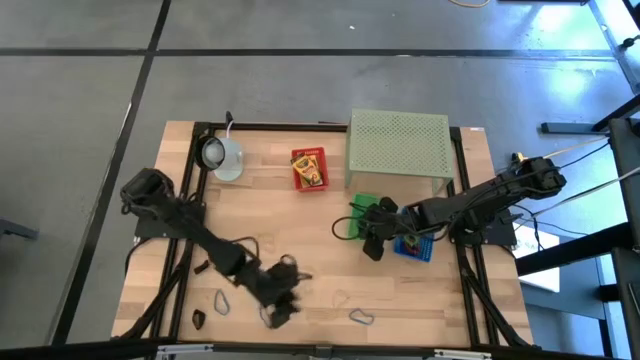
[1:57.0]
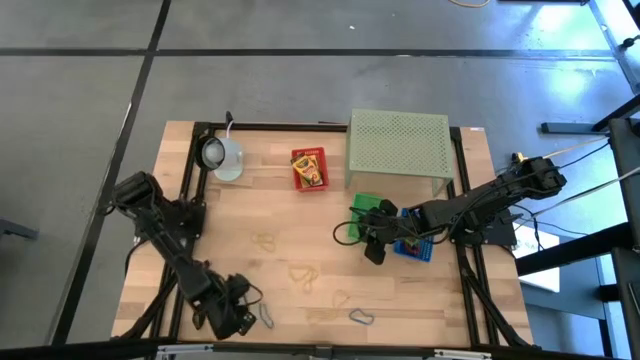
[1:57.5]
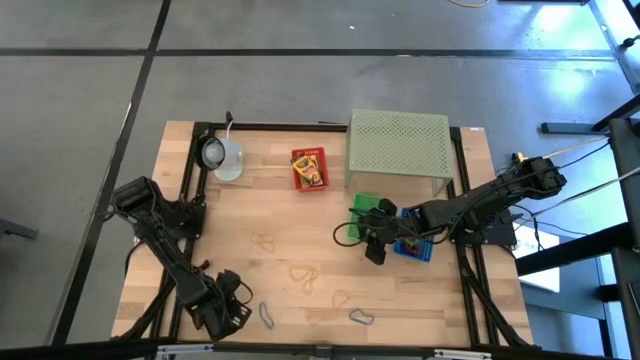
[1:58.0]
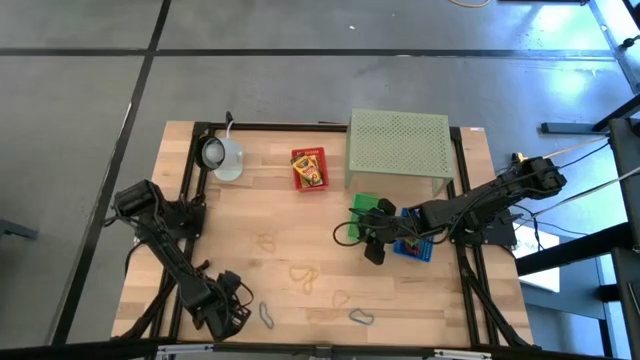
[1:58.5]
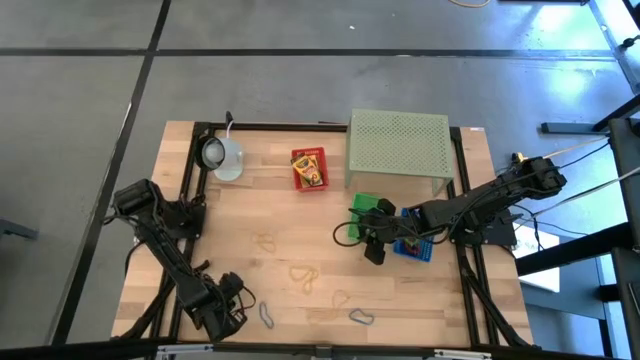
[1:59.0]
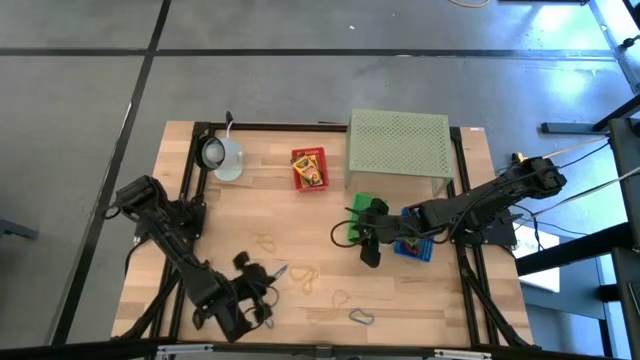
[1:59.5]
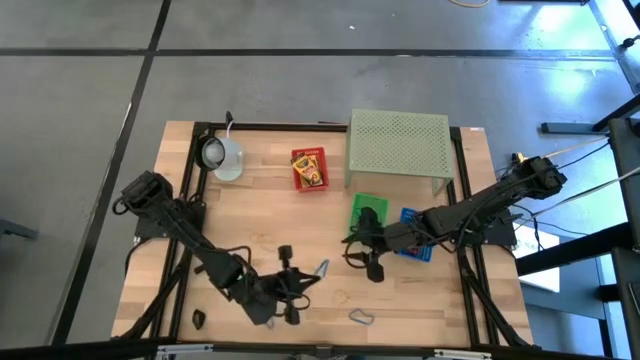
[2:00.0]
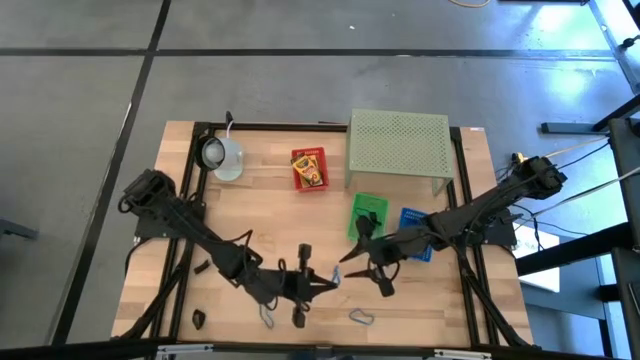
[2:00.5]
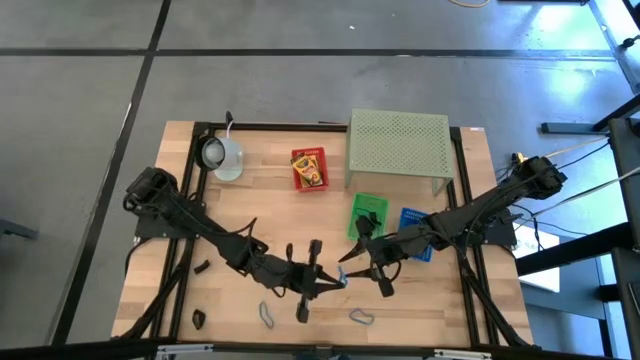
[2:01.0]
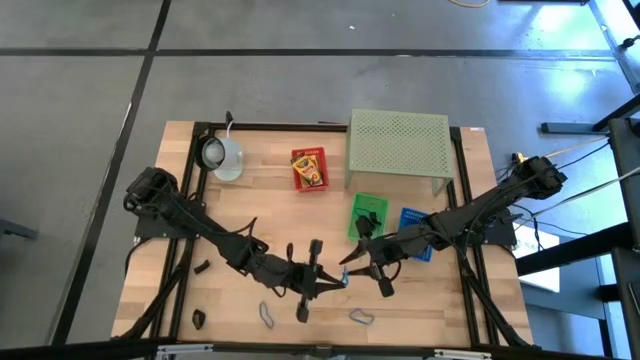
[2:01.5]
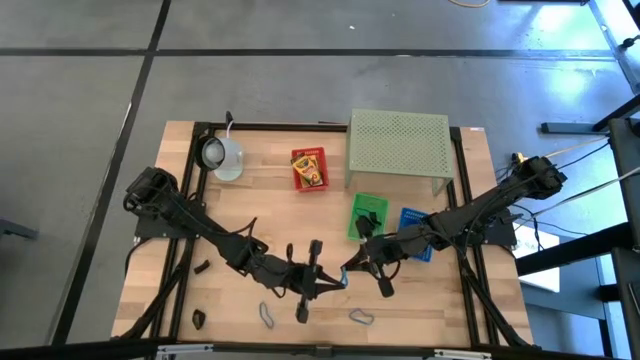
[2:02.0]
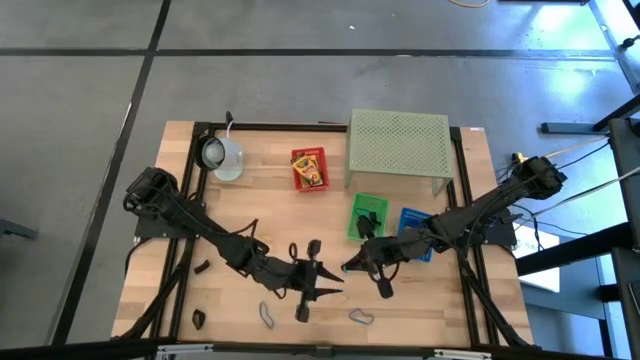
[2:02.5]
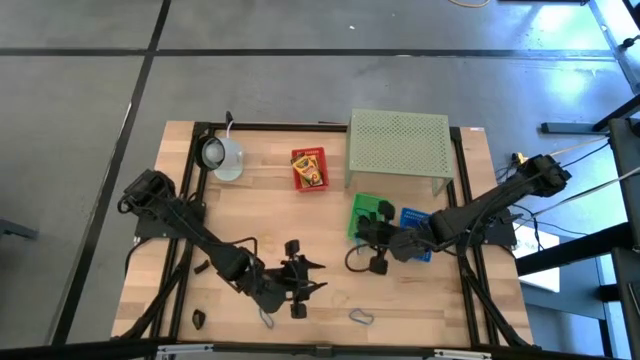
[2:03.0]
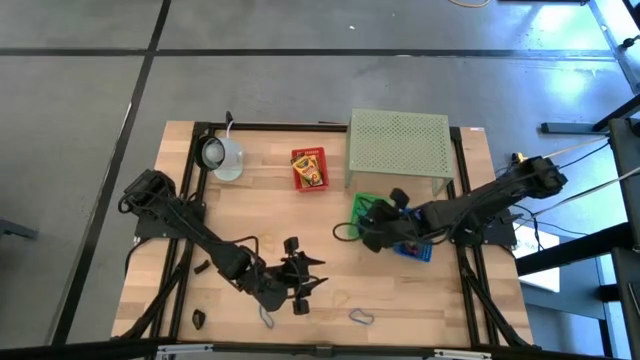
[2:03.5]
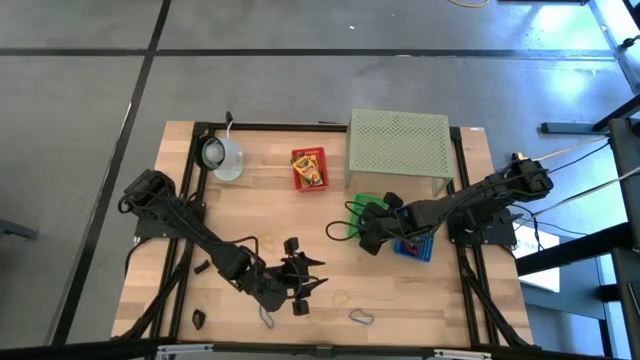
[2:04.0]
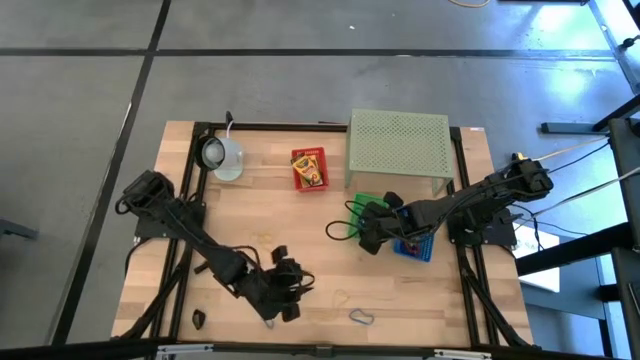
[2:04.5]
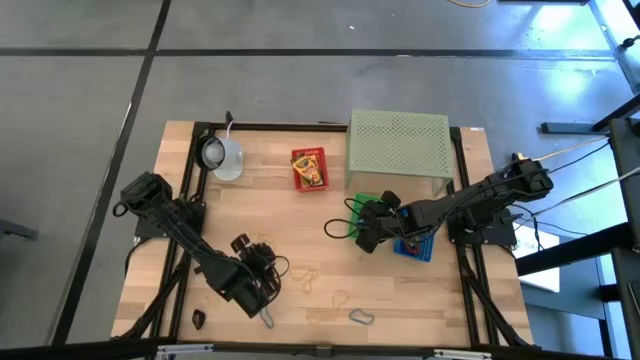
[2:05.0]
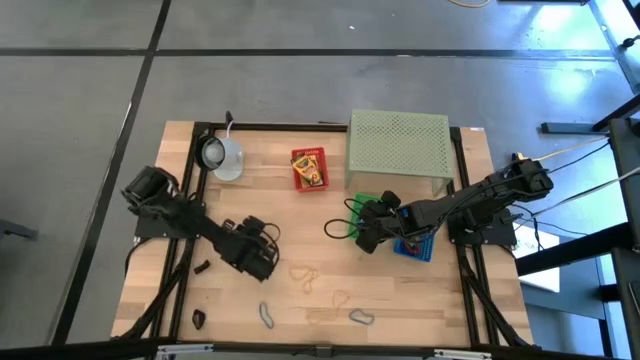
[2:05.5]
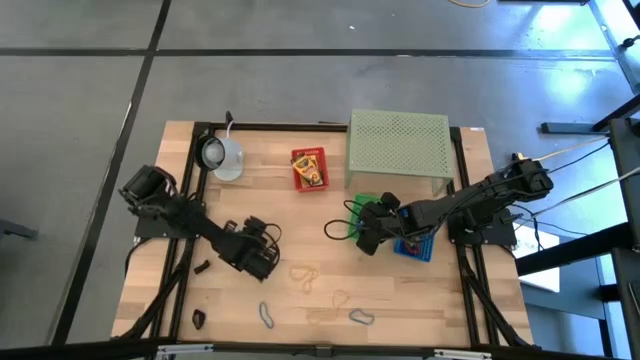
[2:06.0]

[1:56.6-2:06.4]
Task: Pick & Place Office Desk Supplies
Put the blue rubber band into the green bin

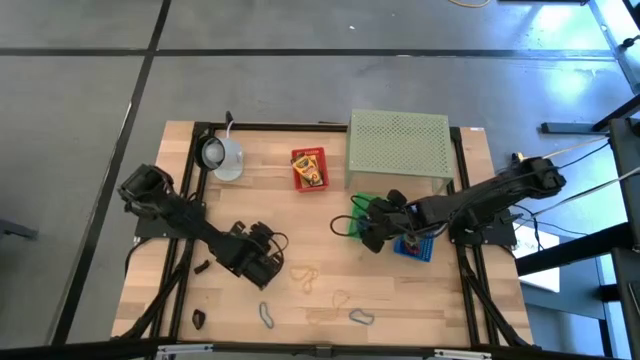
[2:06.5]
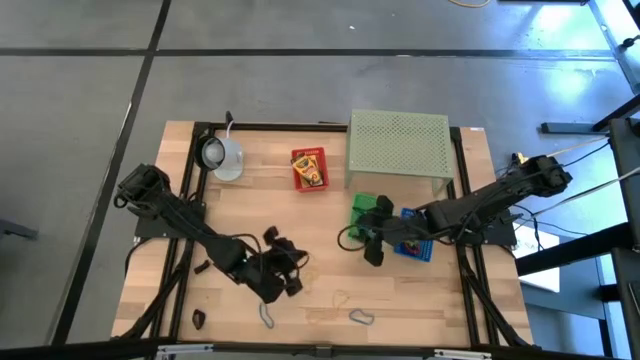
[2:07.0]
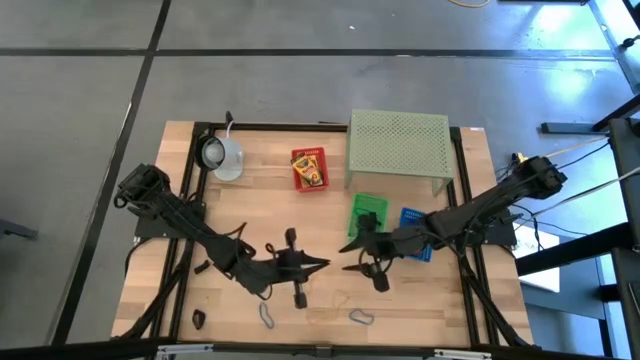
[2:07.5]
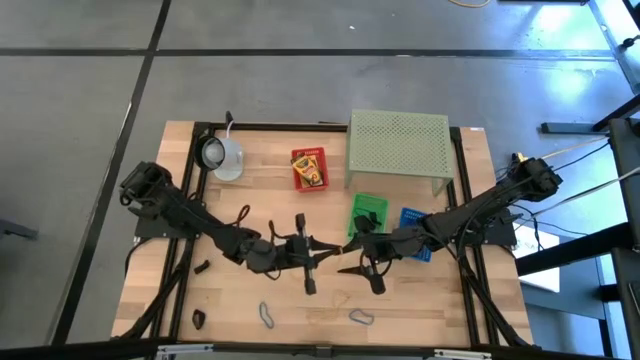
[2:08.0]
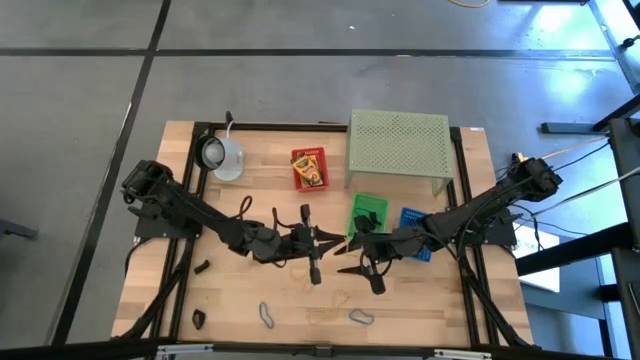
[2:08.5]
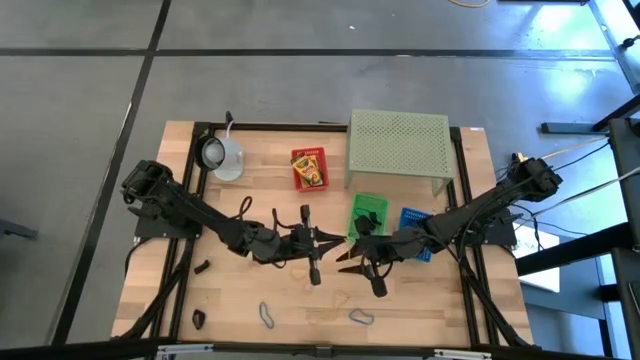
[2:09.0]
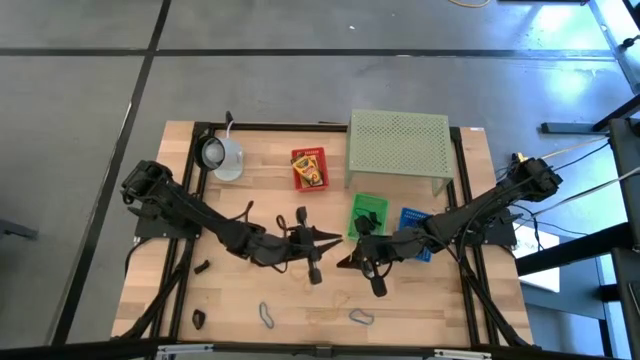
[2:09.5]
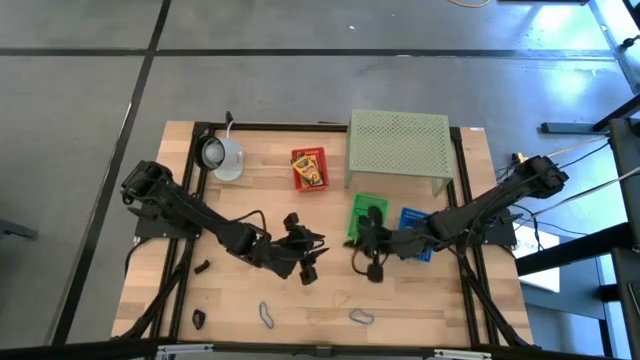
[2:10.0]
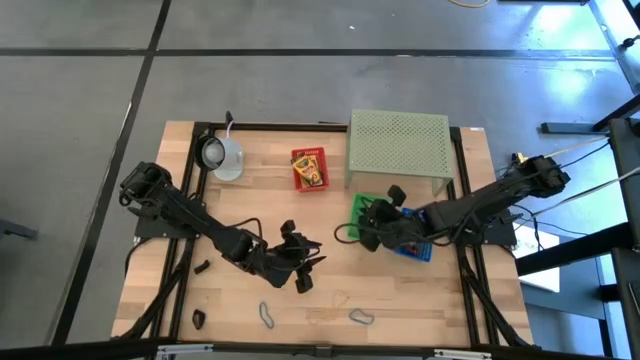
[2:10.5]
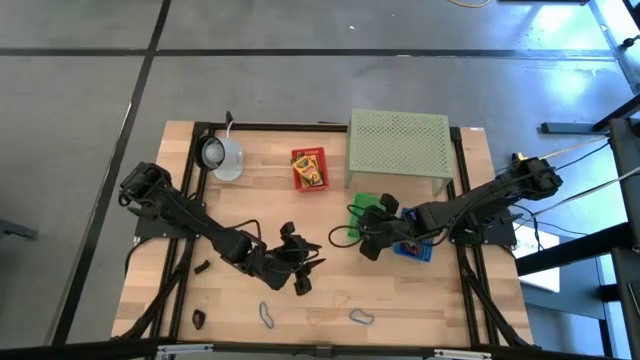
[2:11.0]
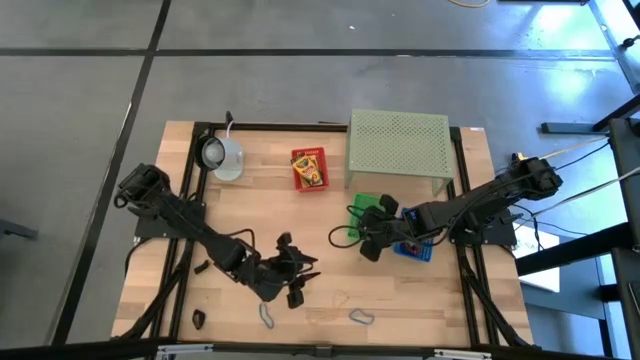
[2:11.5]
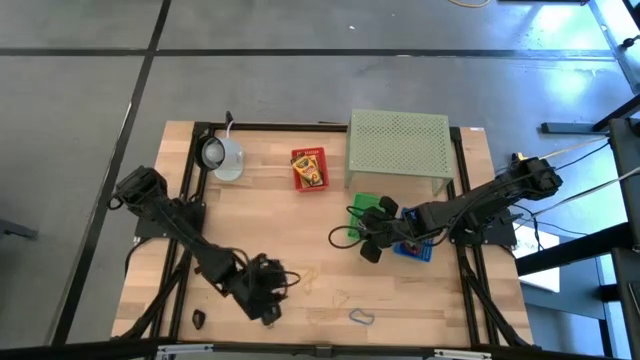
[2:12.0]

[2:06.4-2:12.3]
Put the yellow rubber band into the green bin

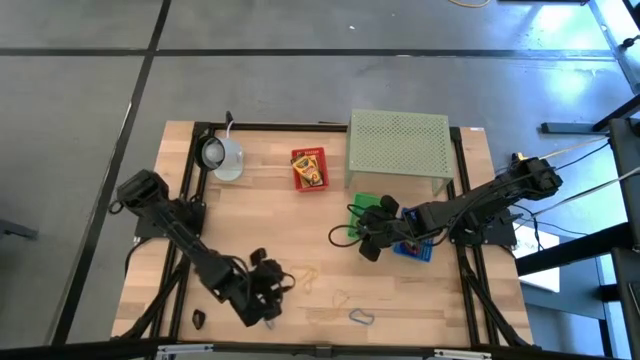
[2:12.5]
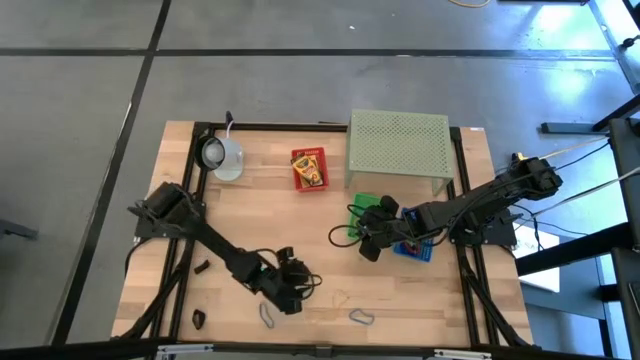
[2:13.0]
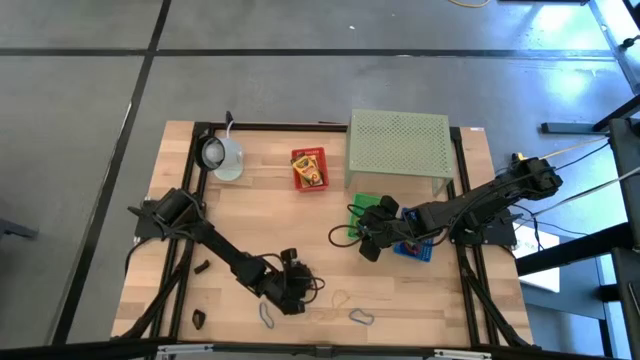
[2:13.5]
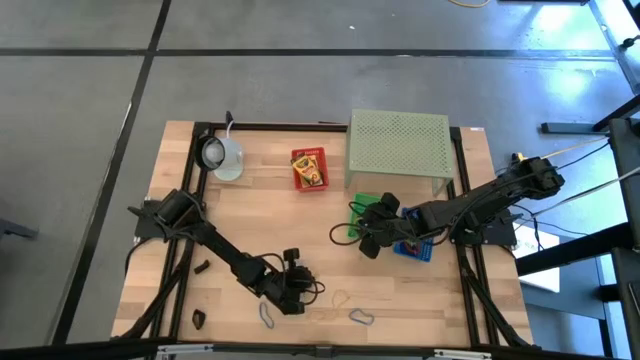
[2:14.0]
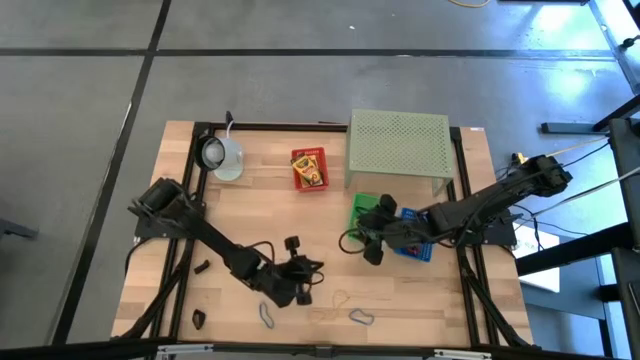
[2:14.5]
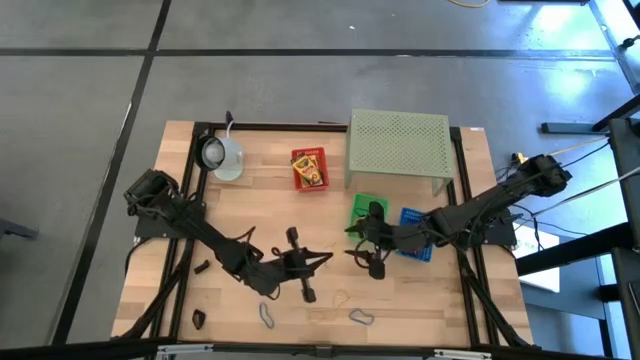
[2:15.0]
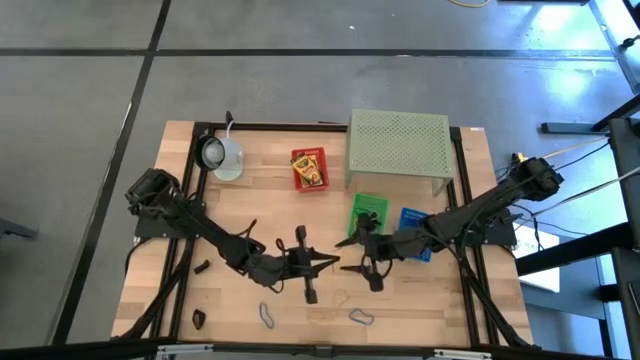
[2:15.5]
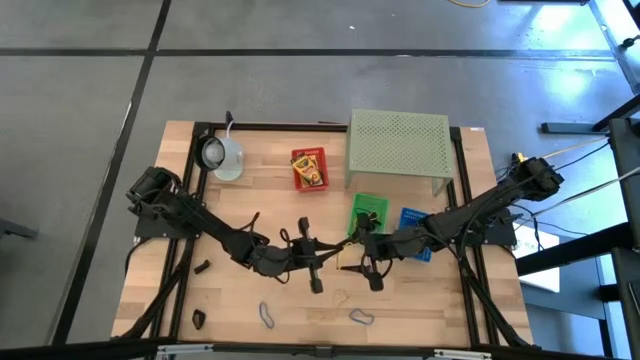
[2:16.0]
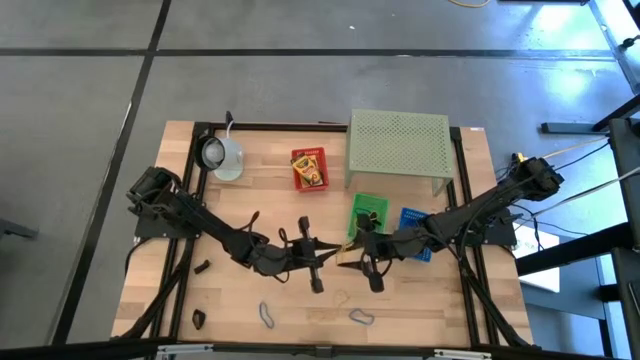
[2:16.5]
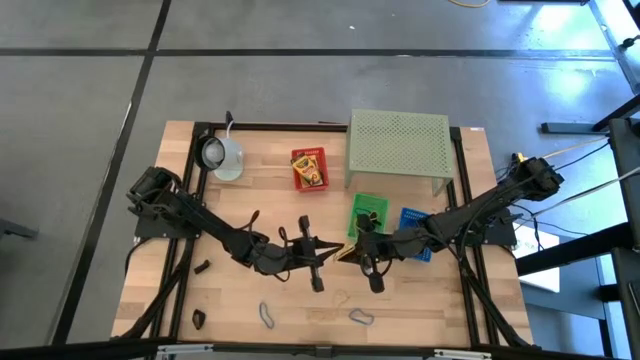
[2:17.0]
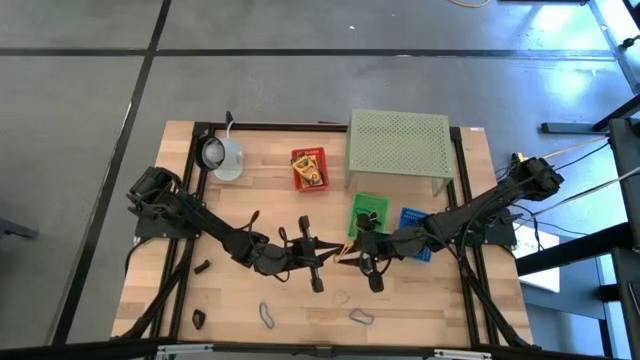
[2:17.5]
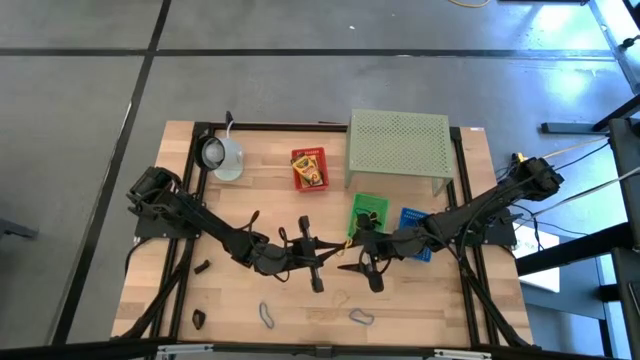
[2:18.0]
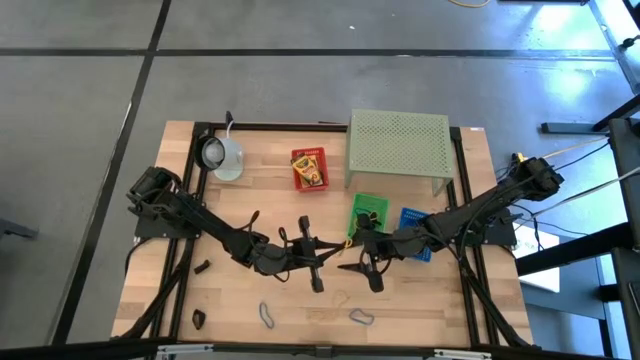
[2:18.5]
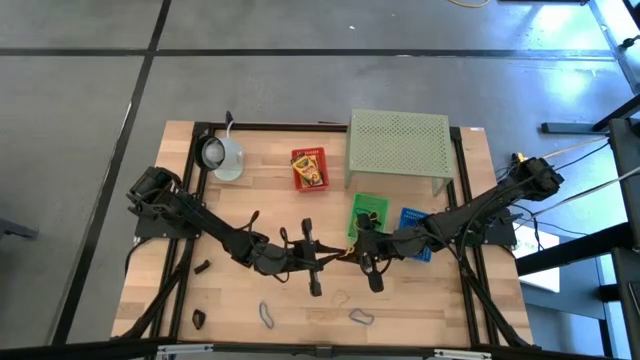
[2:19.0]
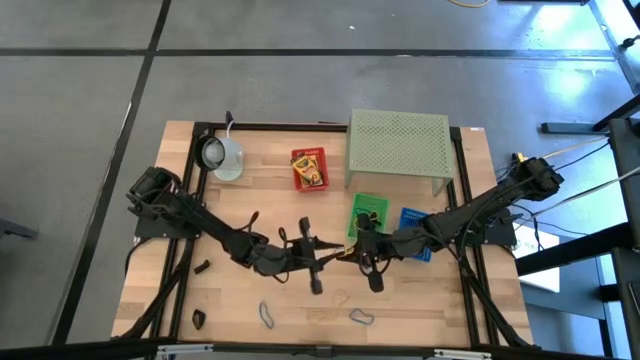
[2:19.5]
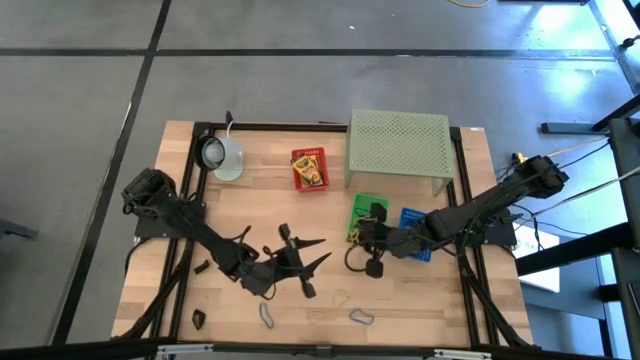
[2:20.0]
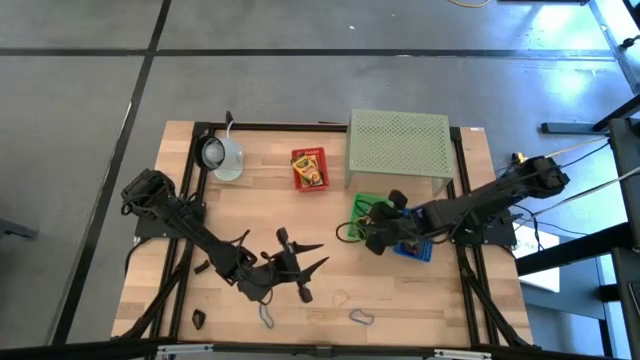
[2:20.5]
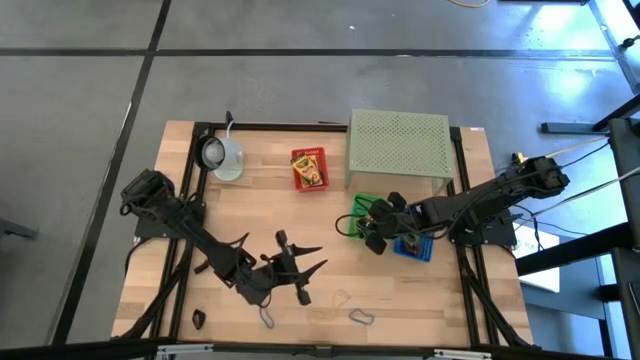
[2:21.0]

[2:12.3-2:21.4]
Put the yellow rubber band into the green bin
